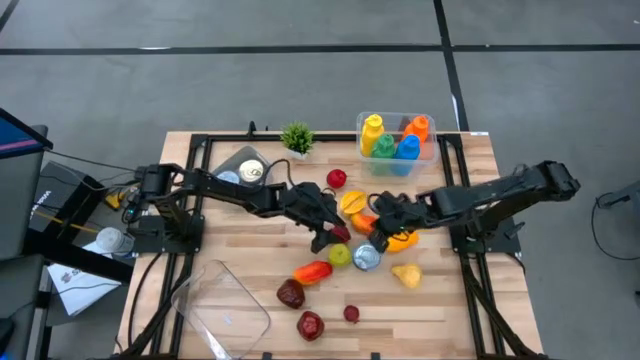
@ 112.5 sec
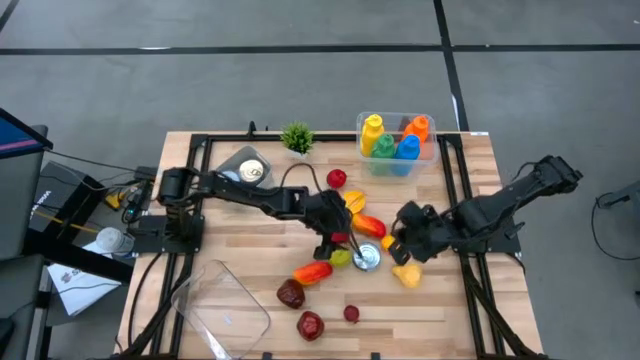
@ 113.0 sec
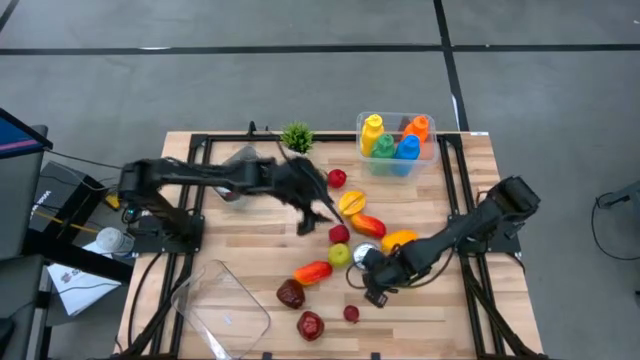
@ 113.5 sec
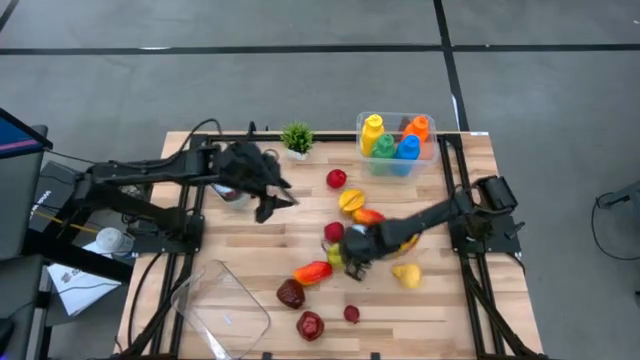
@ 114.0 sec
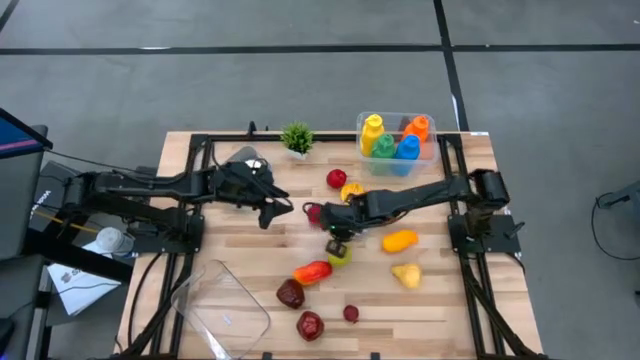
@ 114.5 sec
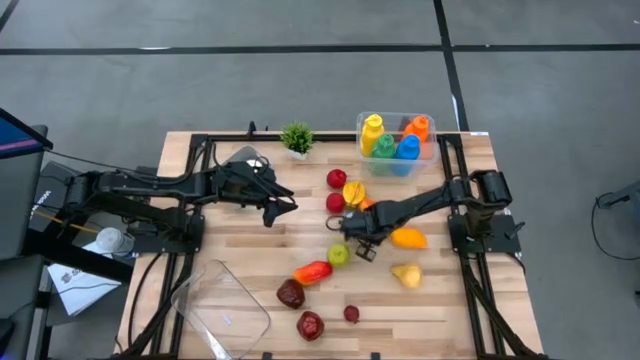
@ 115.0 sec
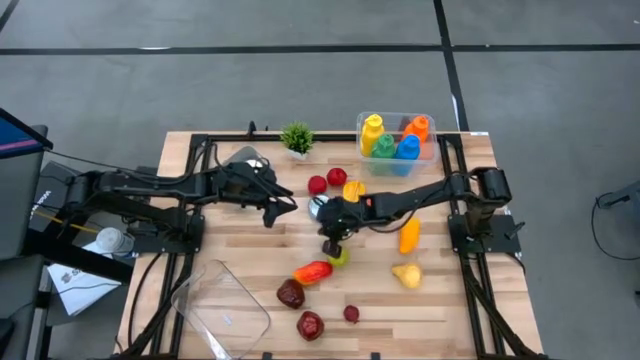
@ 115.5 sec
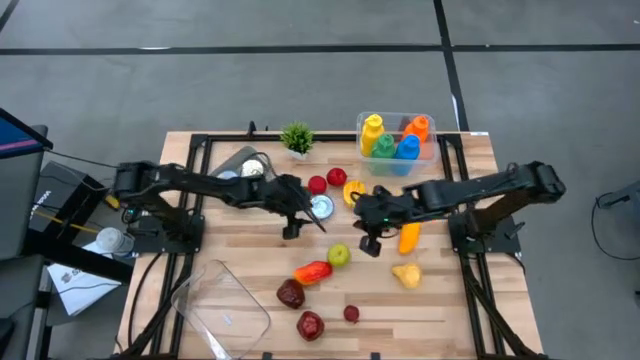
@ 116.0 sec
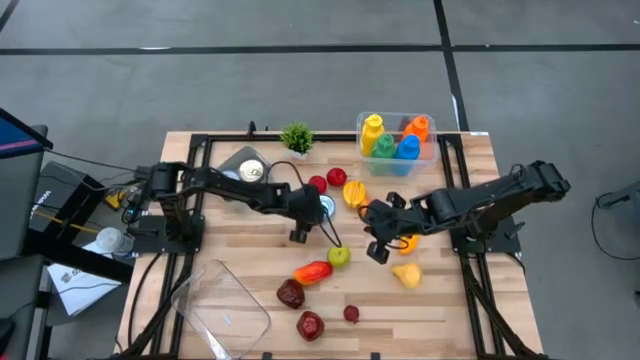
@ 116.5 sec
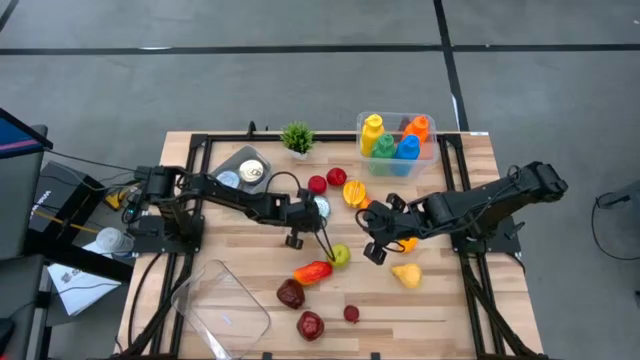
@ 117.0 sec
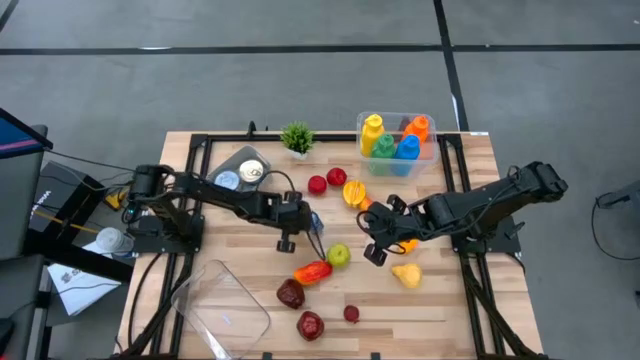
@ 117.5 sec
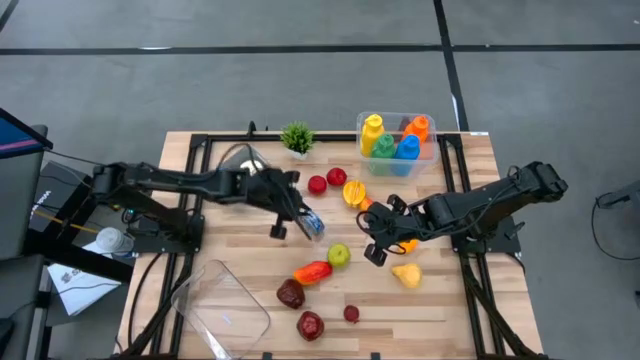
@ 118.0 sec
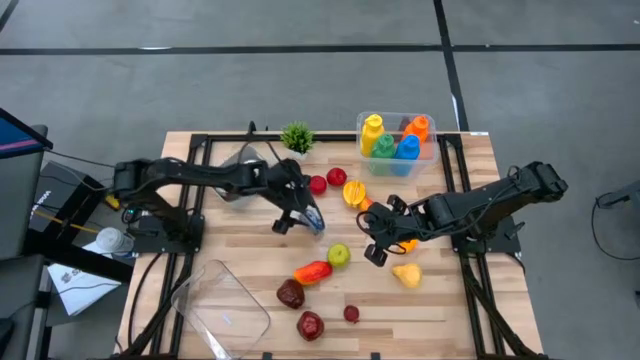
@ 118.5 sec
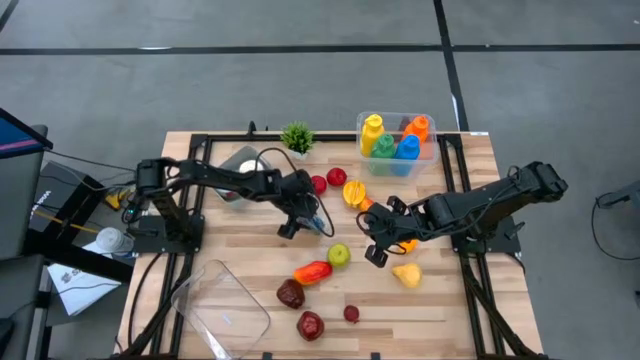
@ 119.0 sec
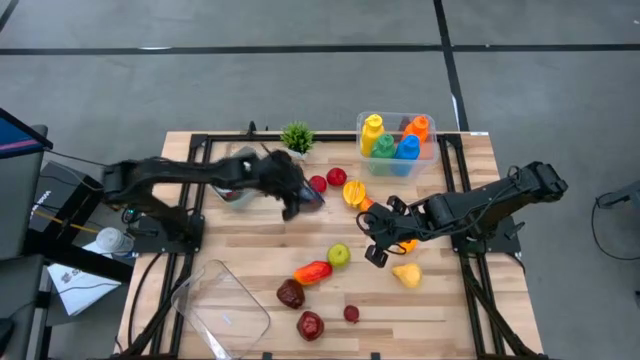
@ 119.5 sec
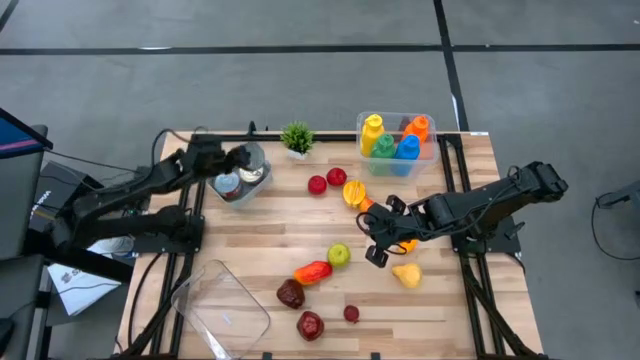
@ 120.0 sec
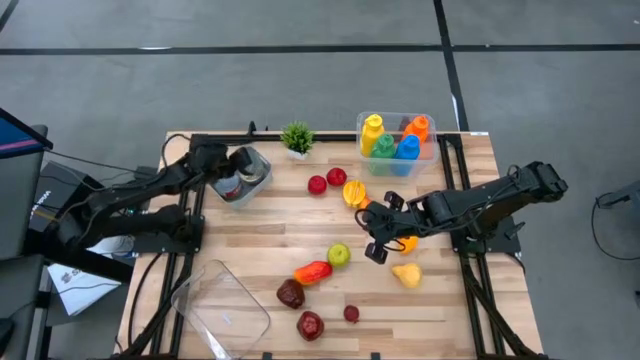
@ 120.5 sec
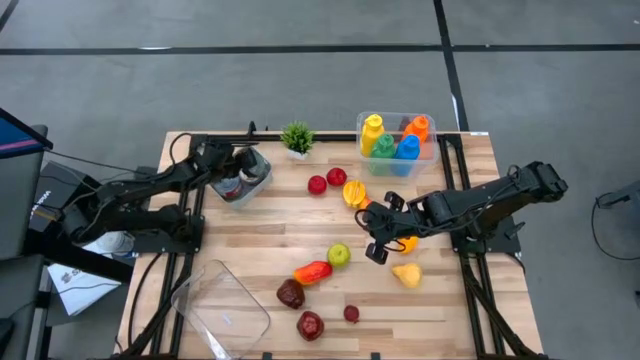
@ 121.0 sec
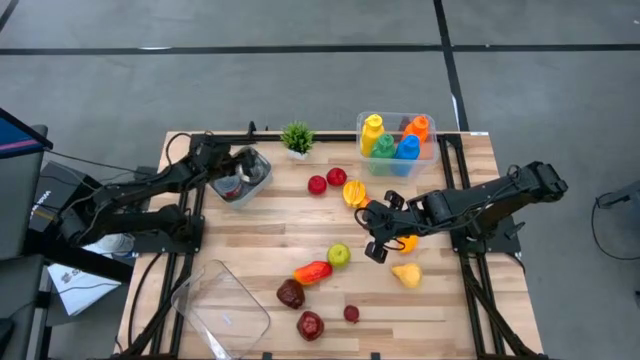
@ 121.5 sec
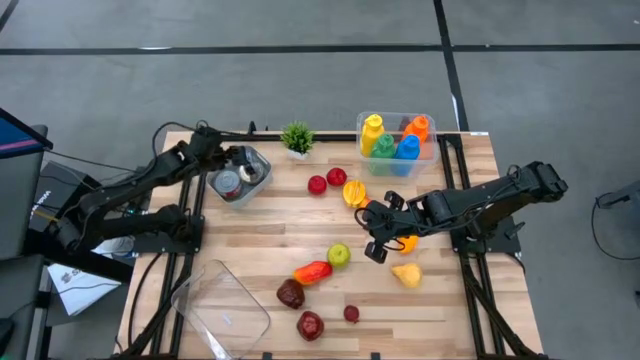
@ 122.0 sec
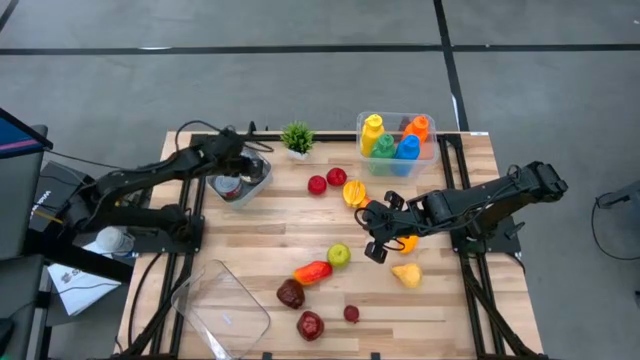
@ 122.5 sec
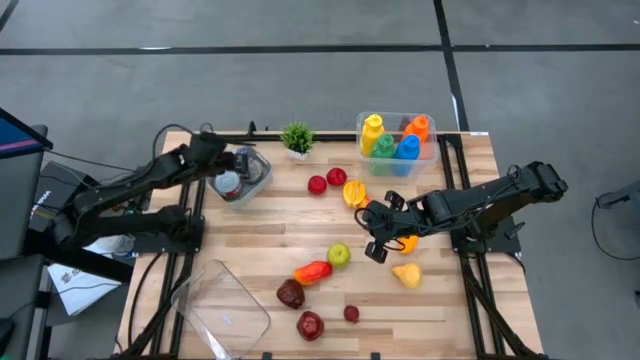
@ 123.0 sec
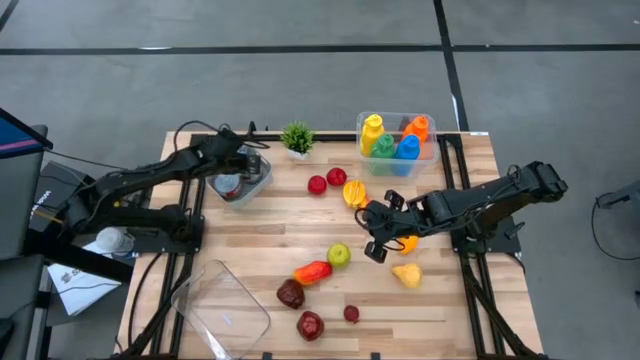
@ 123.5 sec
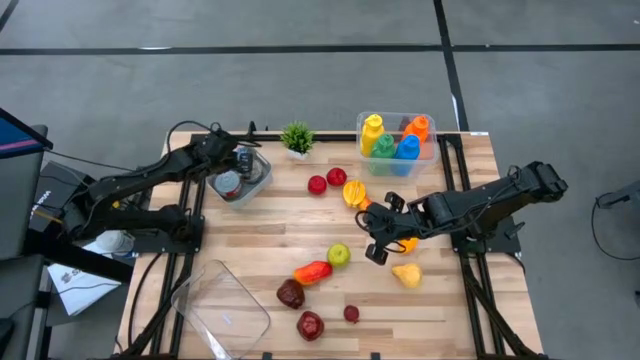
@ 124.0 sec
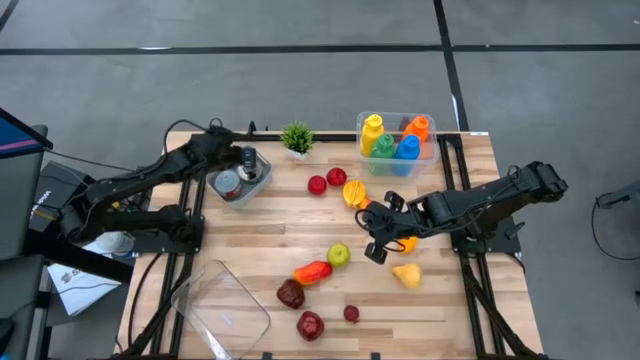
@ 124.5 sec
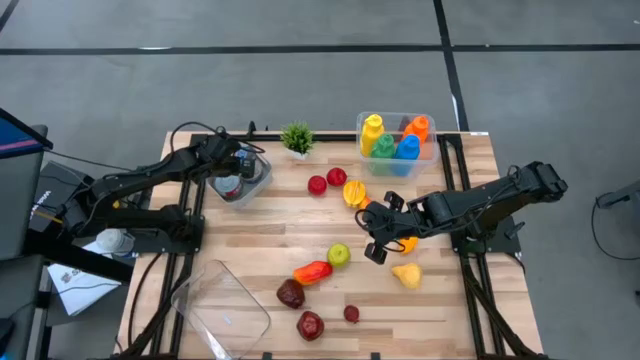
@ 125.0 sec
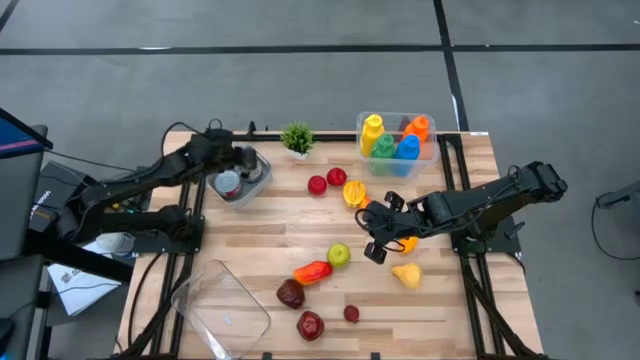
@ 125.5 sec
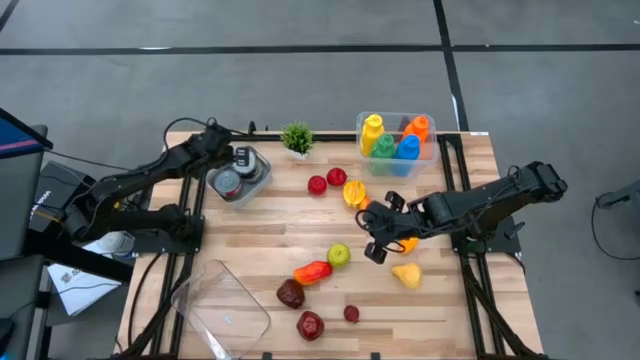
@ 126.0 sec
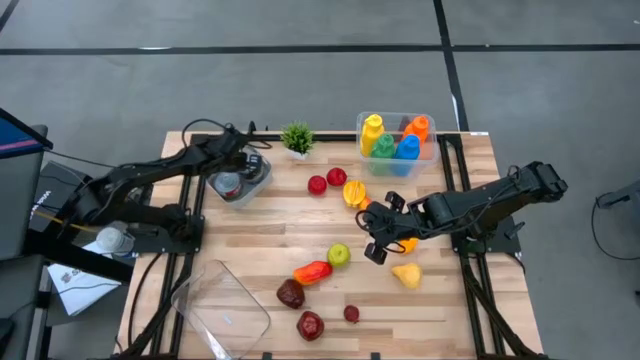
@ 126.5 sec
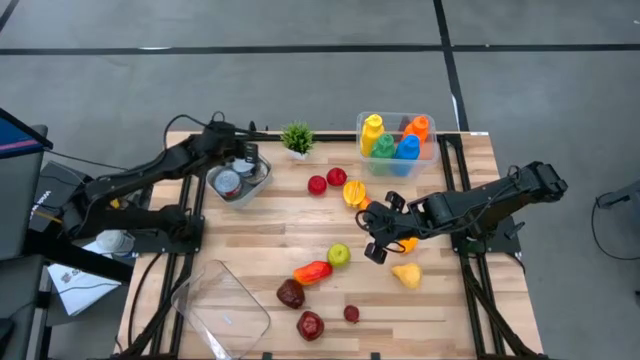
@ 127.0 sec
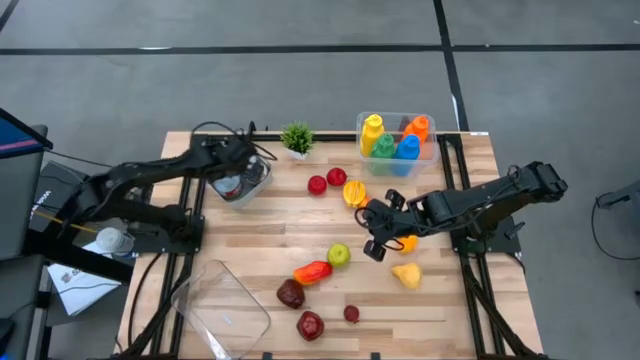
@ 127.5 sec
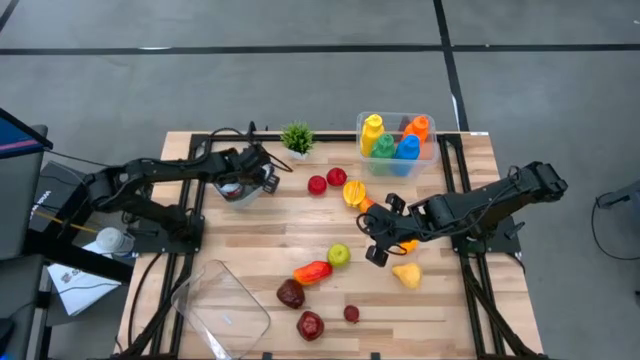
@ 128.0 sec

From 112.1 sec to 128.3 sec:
Task: Pick & Place Food Item
Put the blue tuna can into the gray bin

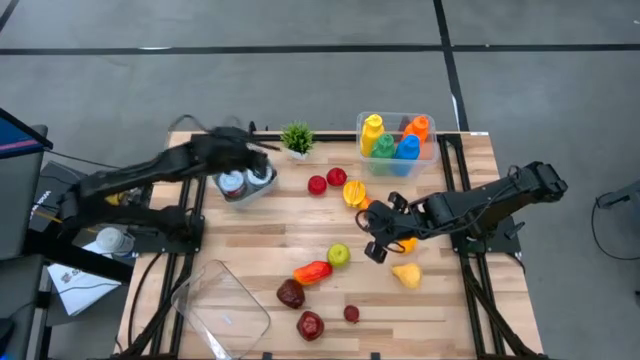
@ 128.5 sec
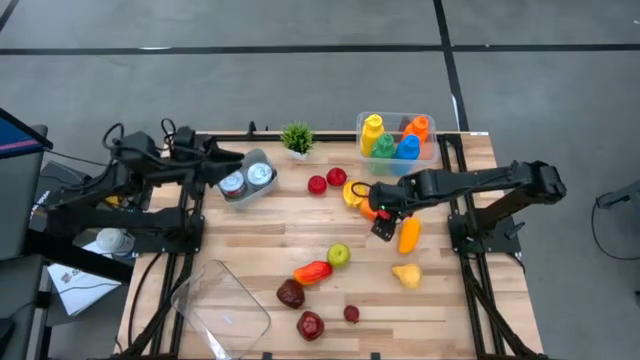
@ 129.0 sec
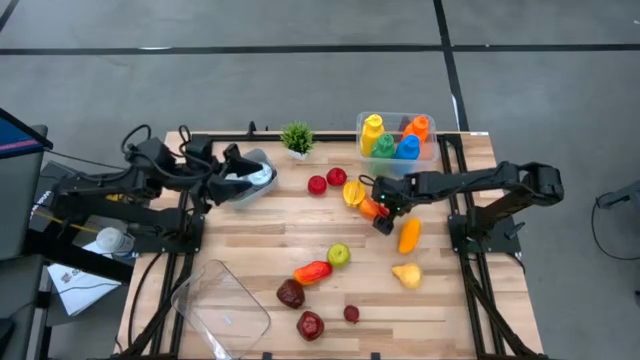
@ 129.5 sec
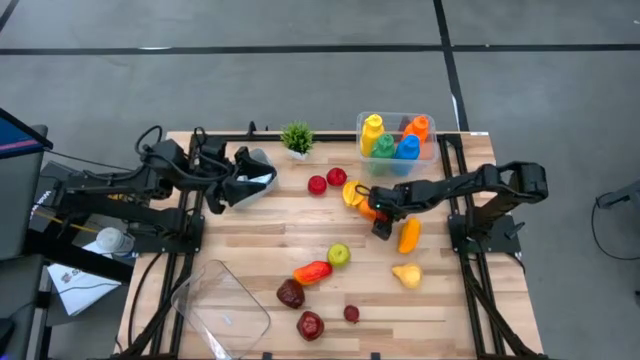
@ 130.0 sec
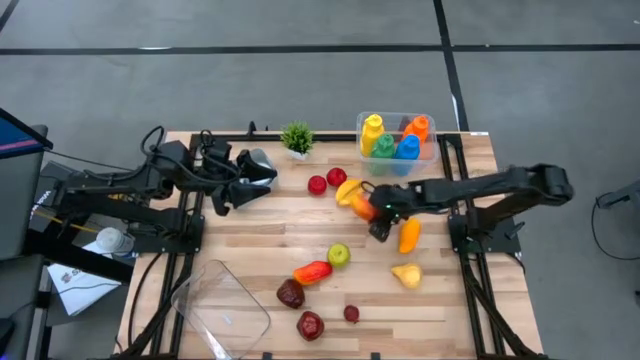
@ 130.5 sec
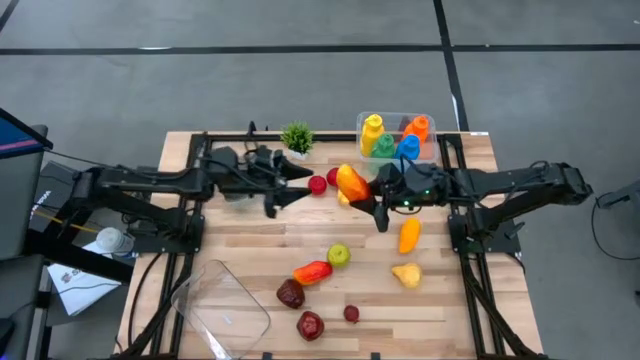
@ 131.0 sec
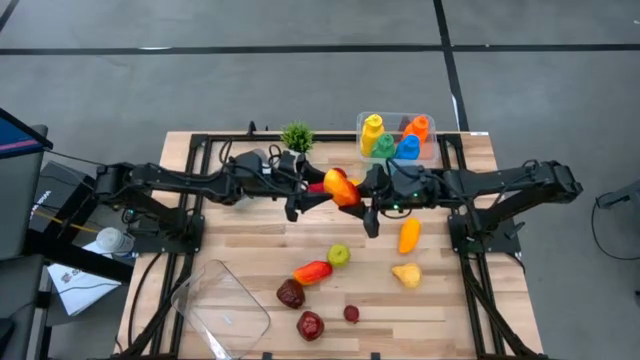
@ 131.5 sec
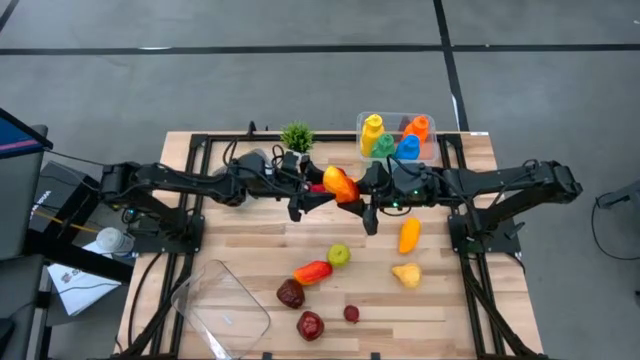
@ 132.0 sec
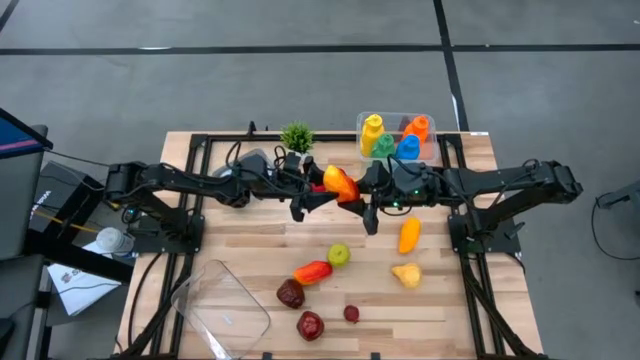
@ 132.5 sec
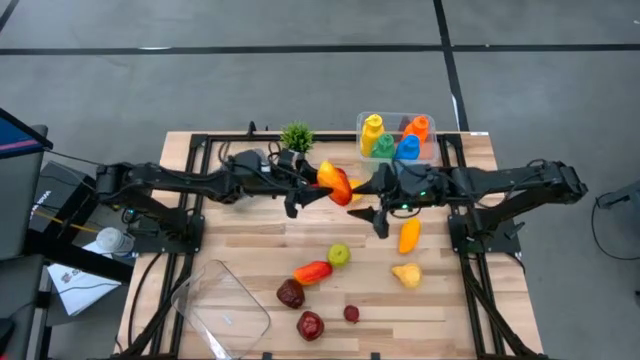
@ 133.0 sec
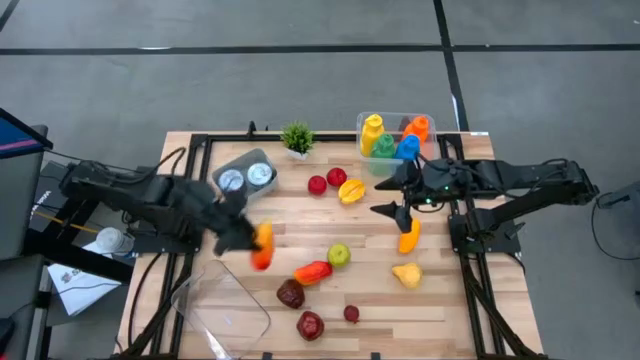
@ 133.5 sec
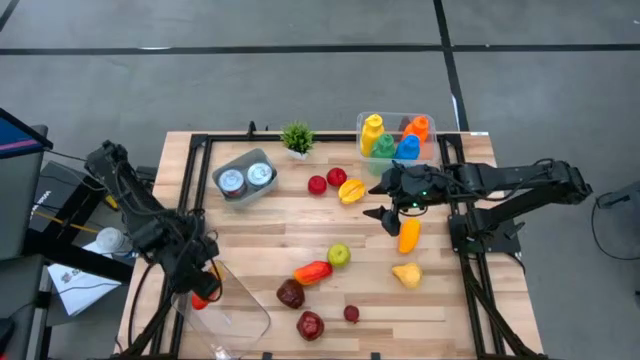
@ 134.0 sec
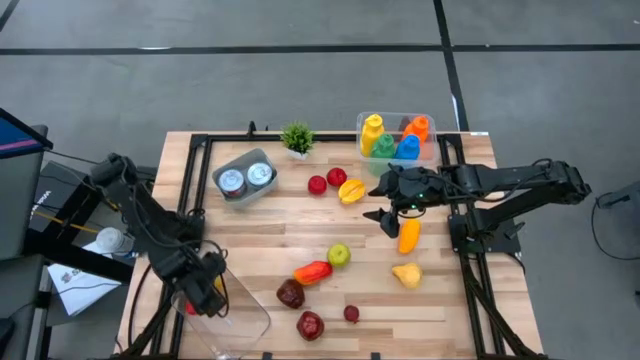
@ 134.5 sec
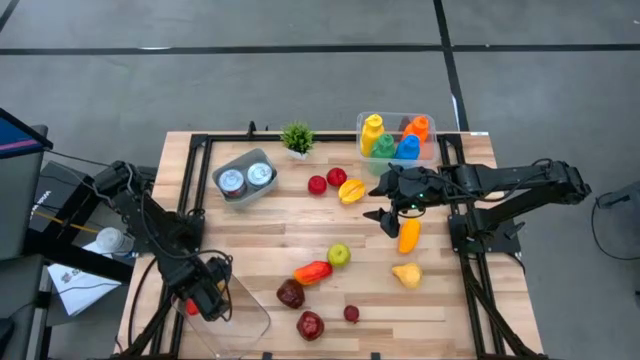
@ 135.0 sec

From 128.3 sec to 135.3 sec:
Put the top orange mango into the bottom transparent bin
